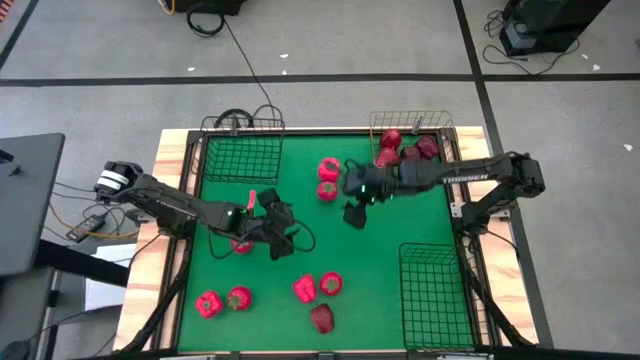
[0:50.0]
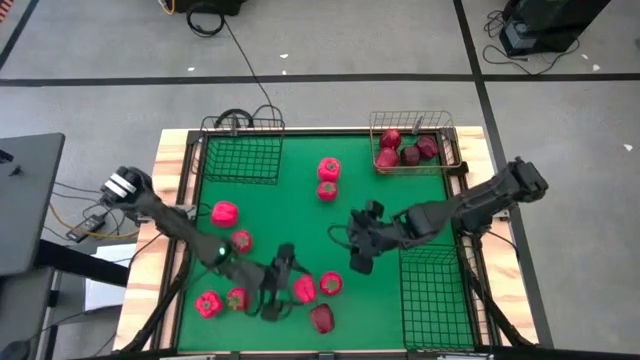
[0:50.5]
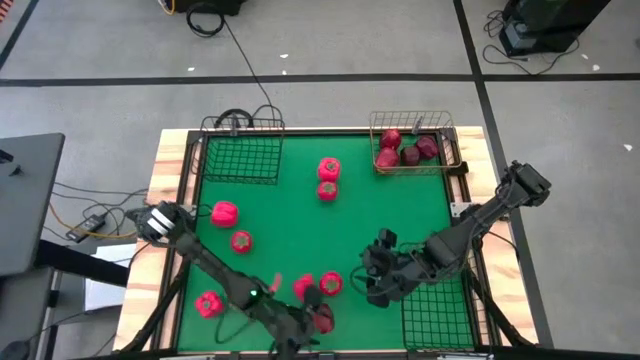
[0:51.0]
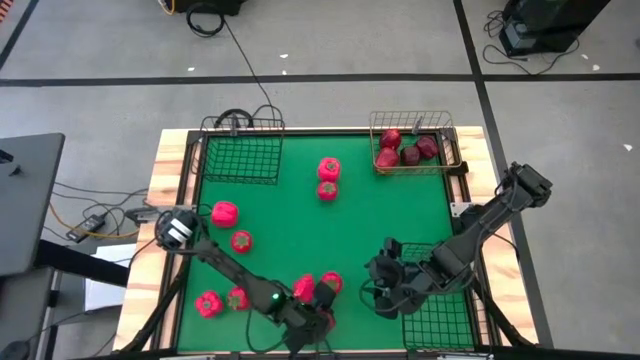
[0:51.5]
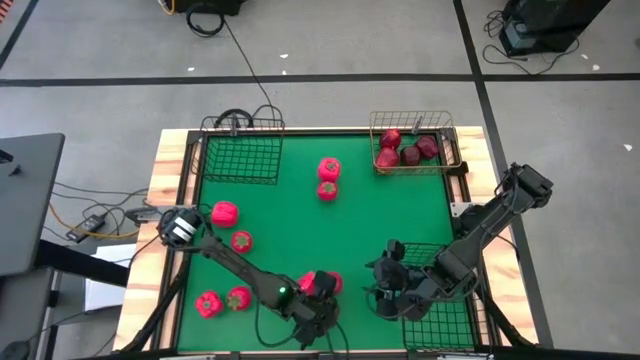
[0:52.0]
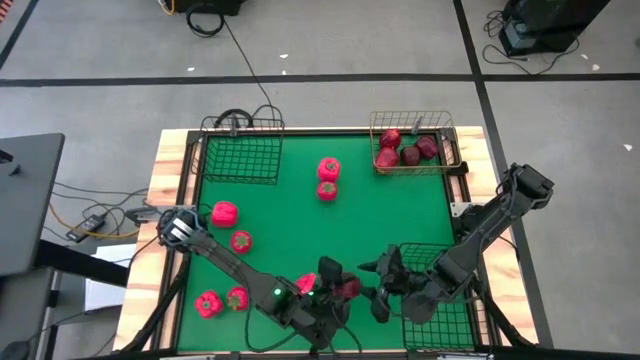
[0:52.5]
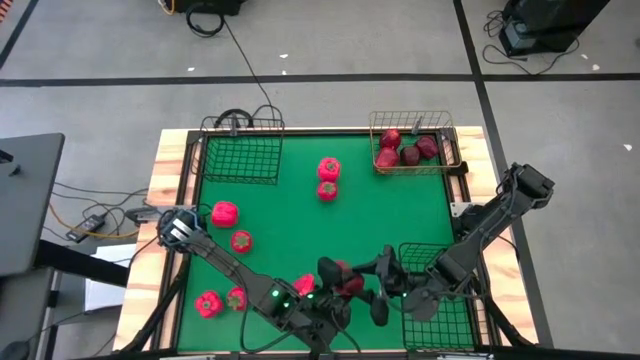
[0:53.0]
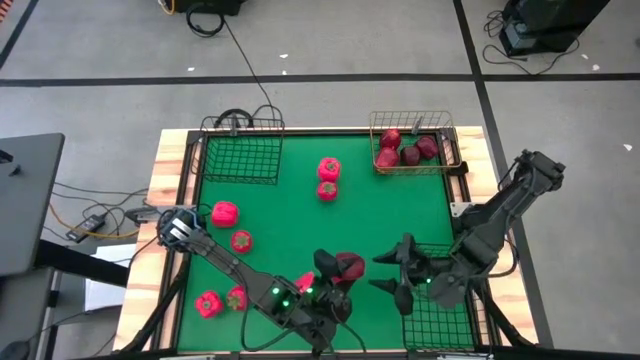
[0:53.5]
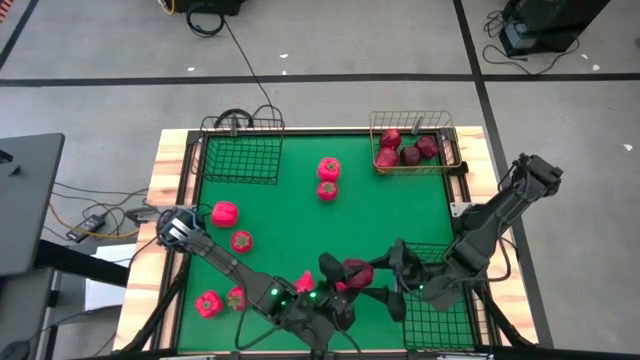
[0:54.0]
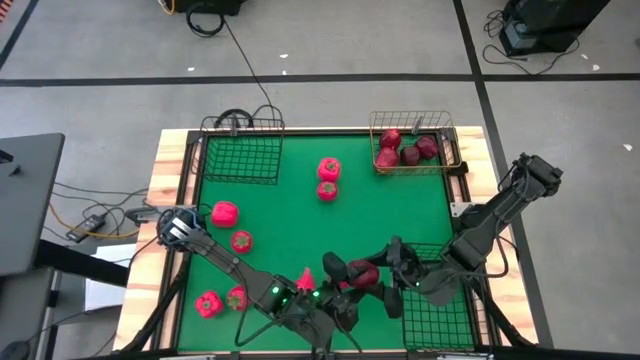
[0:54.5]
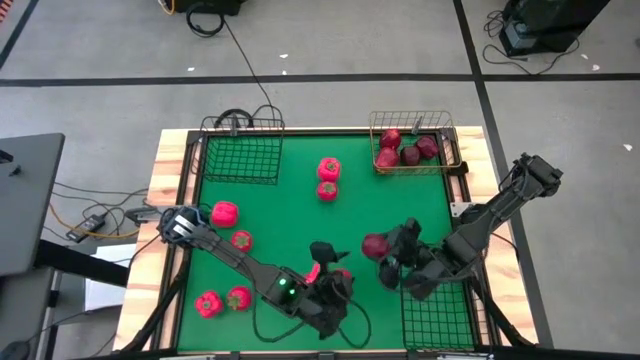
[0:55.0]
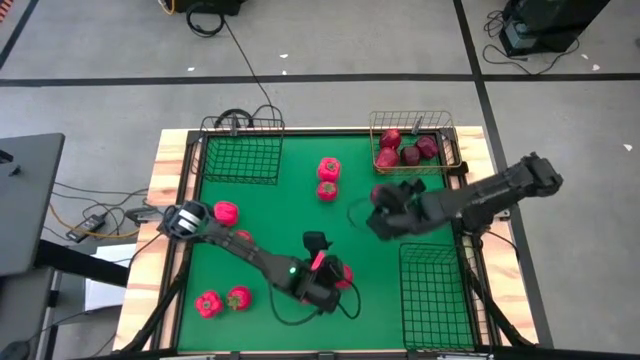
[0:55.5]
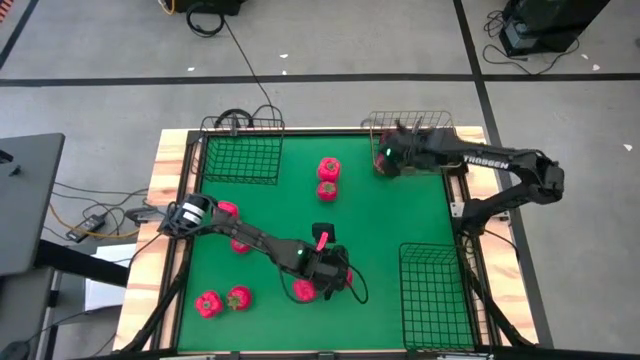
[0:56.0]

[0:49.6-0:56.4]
Task: Sort produce into baskets
Put the red apple into the gold wire basket

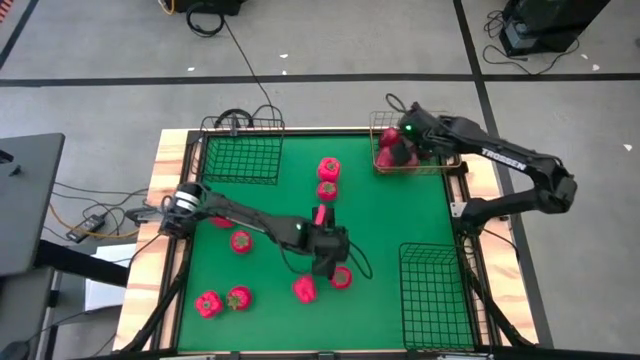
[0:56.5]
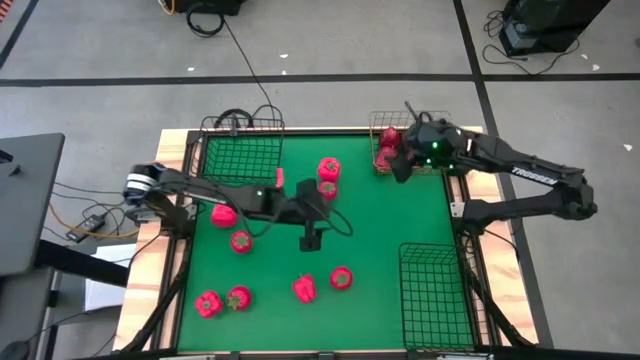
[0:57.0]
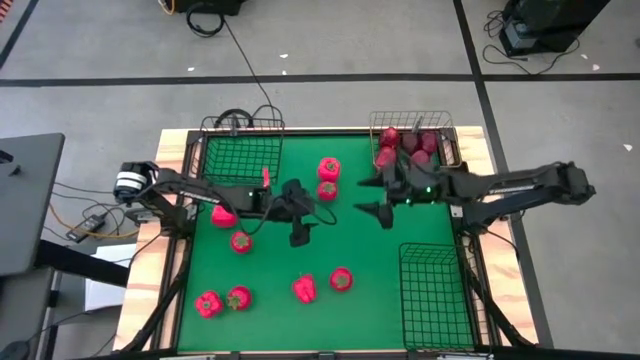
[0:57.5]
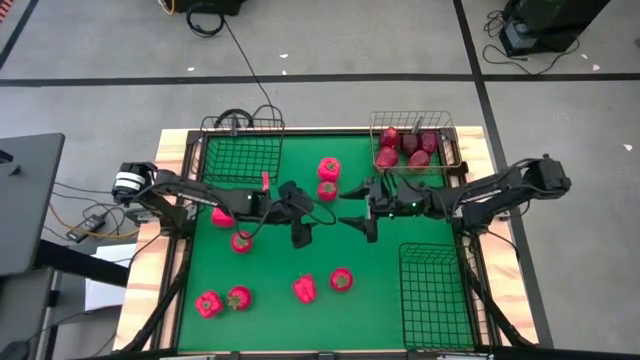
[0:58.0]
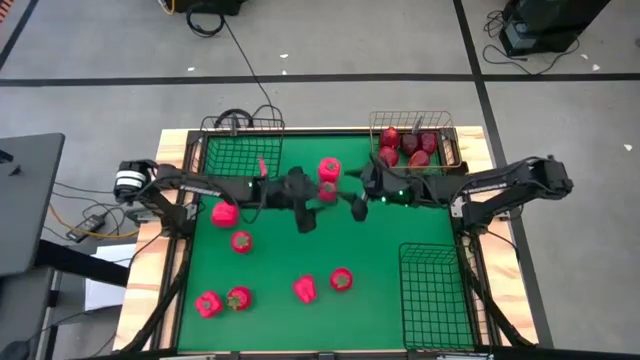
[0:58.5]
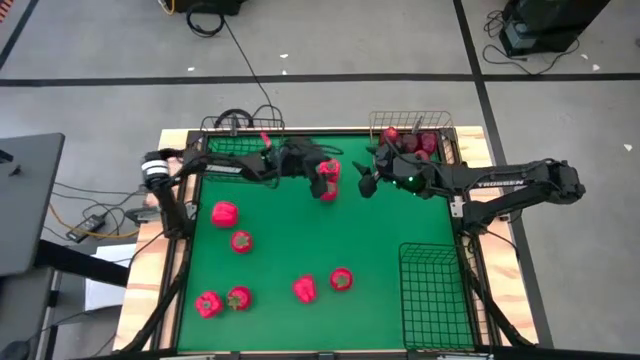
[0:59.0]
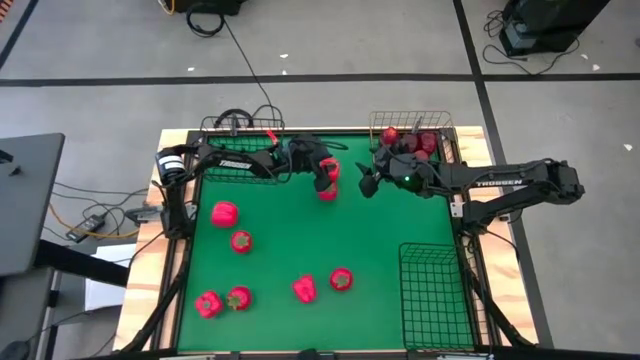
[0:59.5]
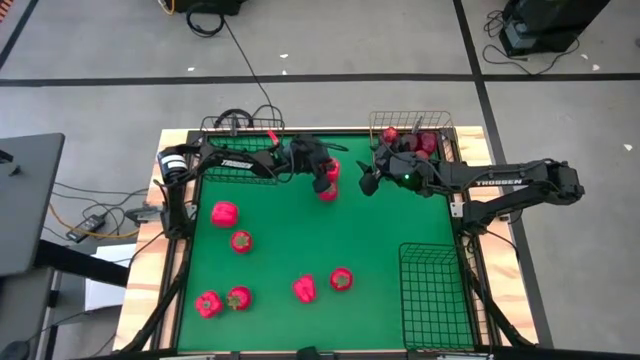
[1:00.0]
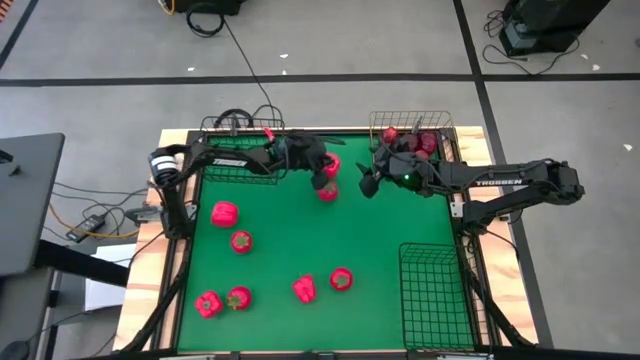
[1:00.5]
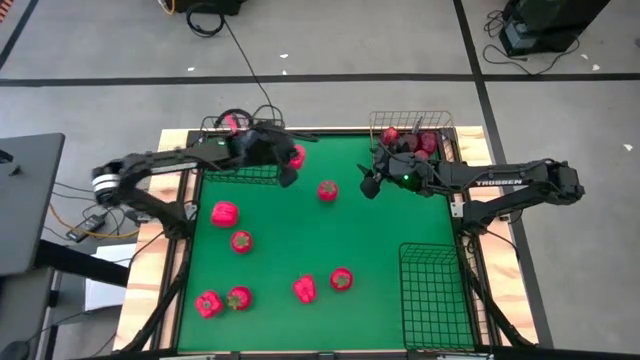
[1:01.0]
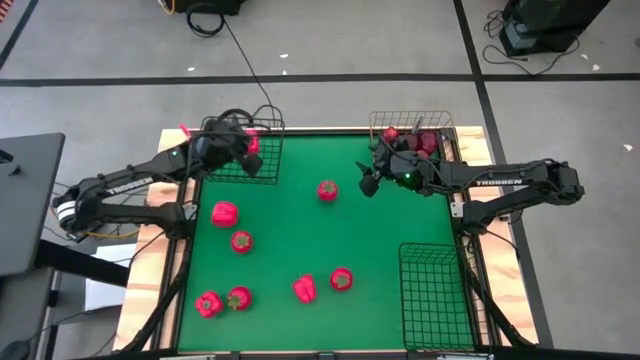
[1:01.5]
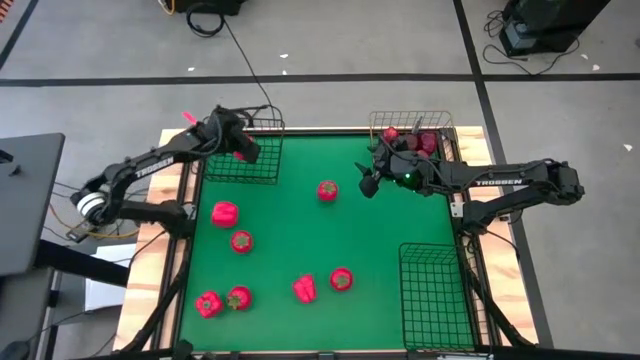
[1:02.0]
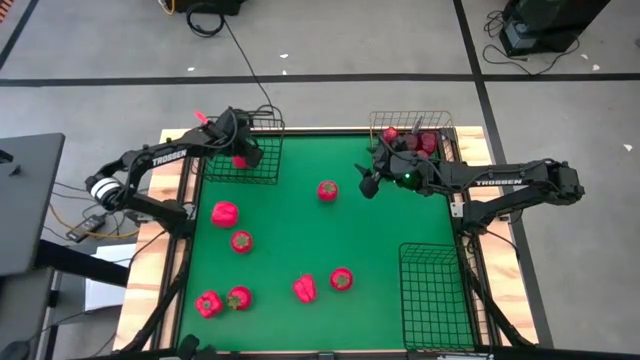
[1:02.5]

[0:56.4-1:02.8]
Put the red bell pepper into the top black wire basket

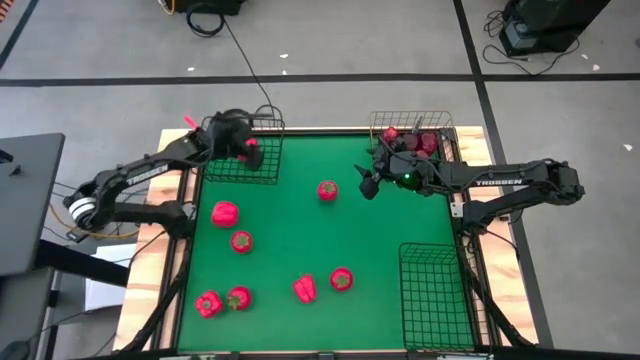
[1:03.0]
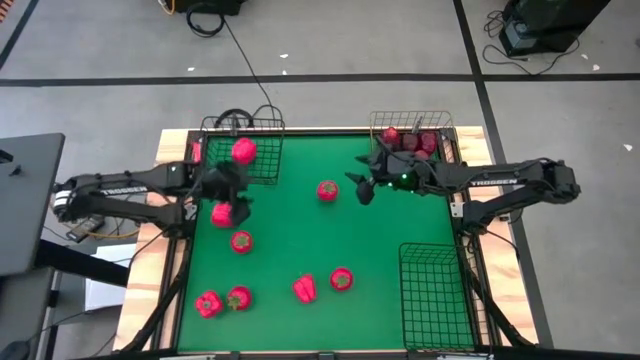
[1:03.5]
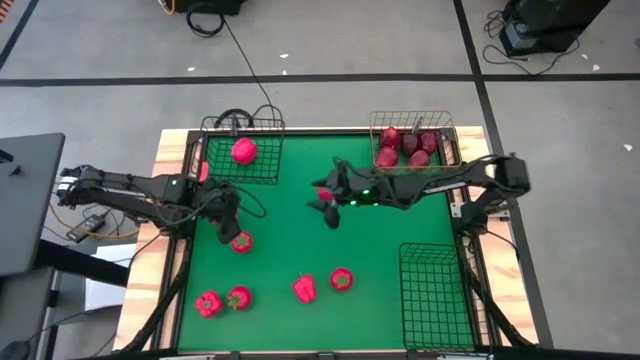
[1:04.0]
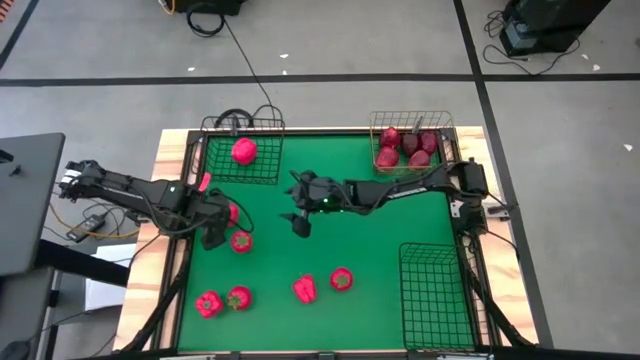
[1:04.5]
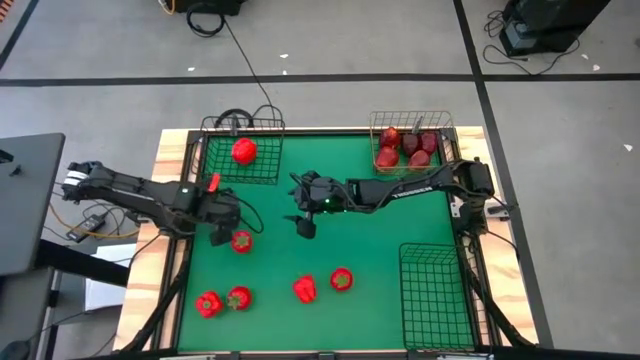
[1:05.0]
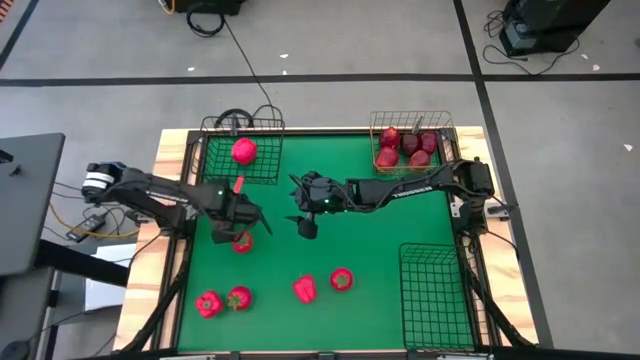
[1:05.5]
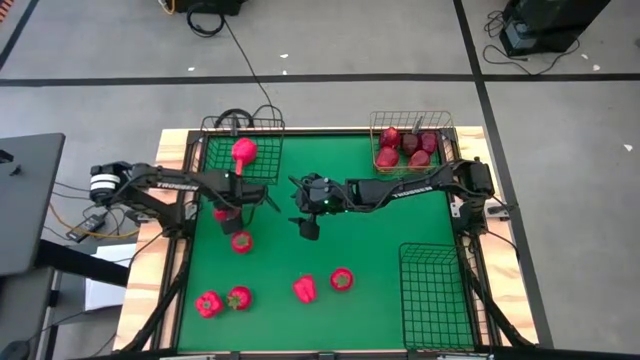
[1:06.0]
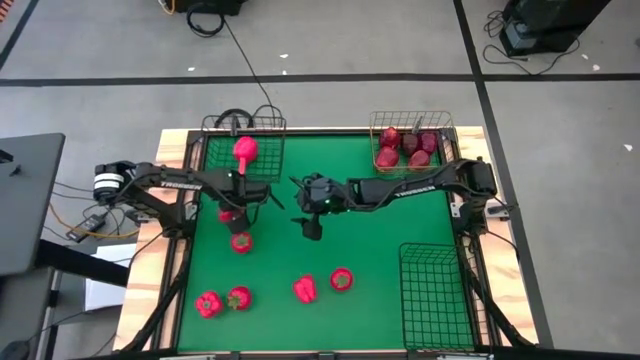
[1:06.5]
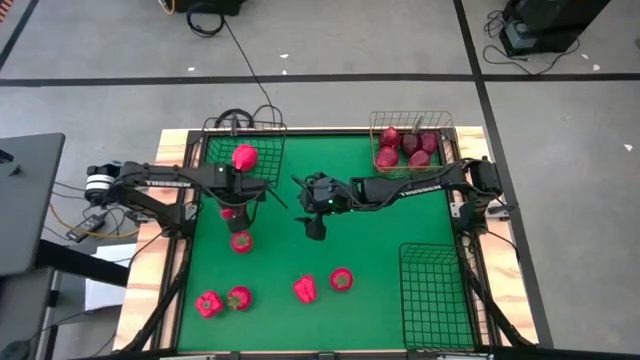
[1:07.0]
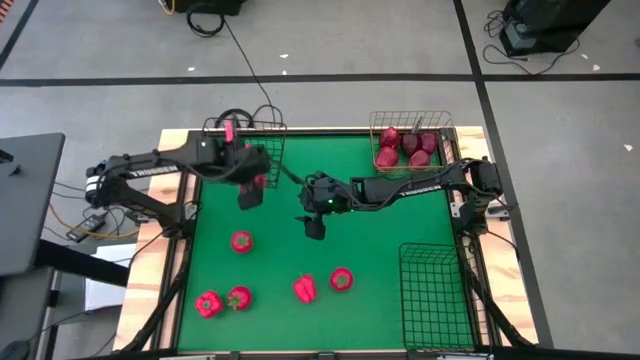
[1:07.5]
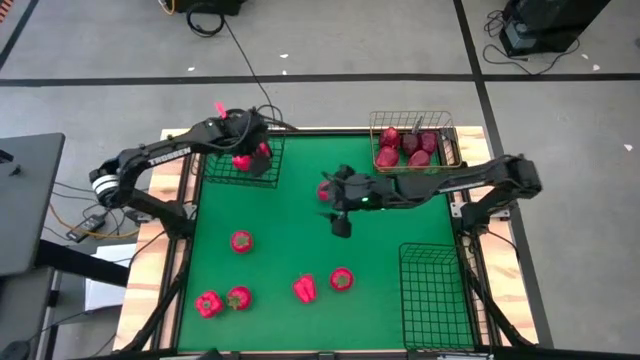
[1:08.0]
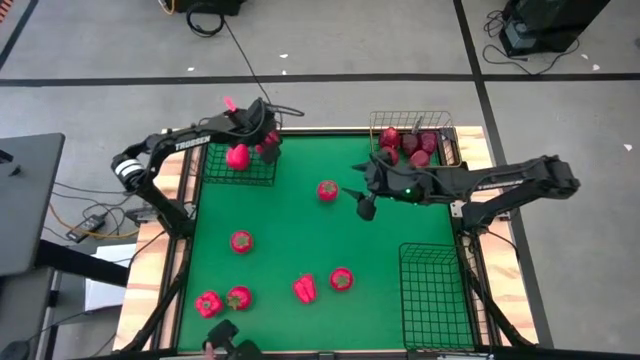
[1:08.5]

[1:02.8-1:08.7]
Put the red bell pepper into the top black wire basket

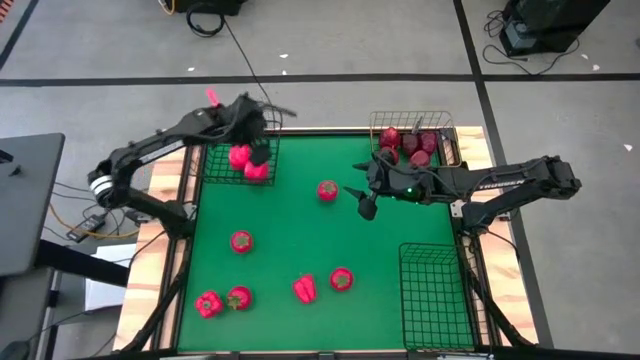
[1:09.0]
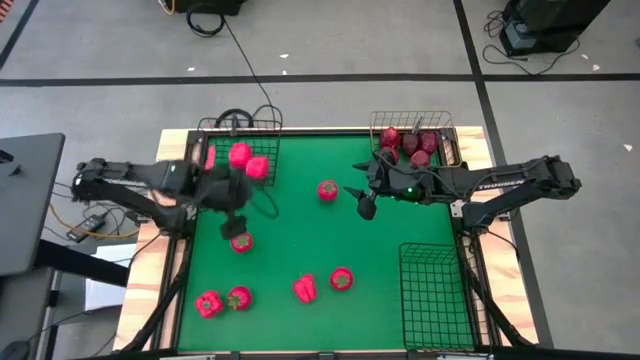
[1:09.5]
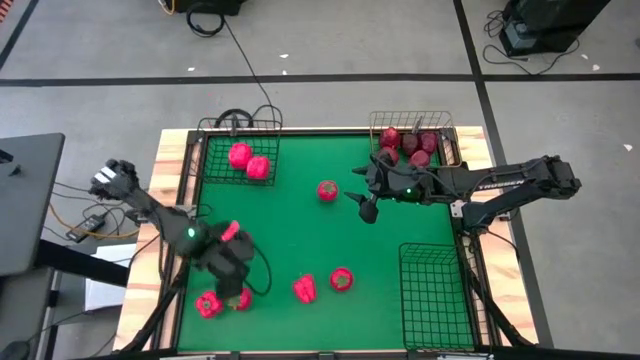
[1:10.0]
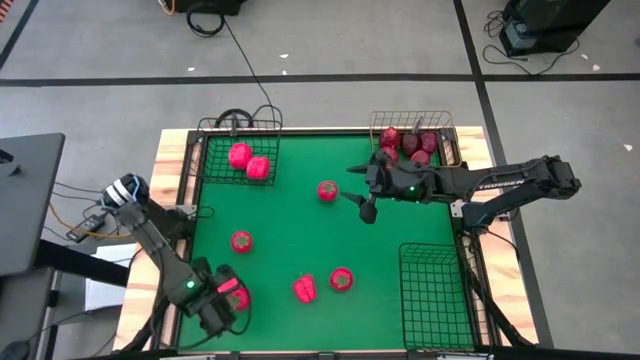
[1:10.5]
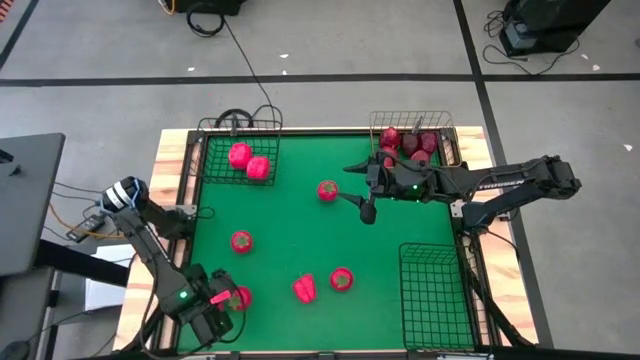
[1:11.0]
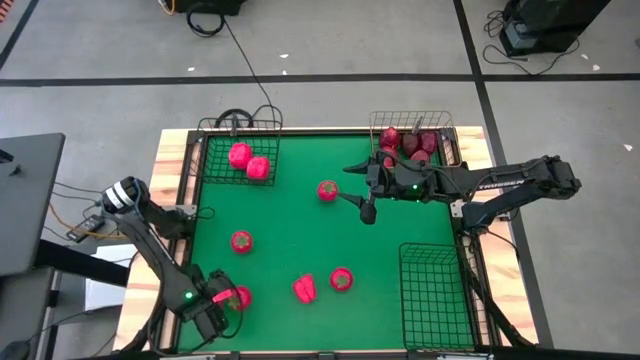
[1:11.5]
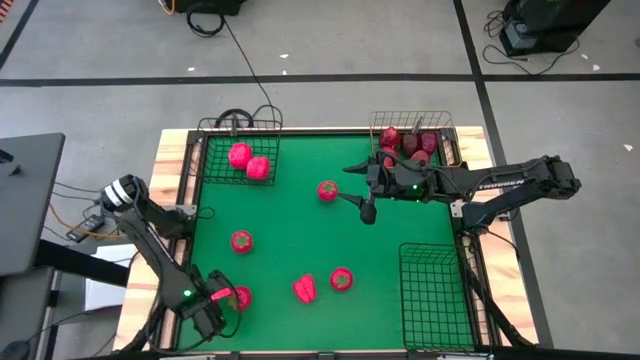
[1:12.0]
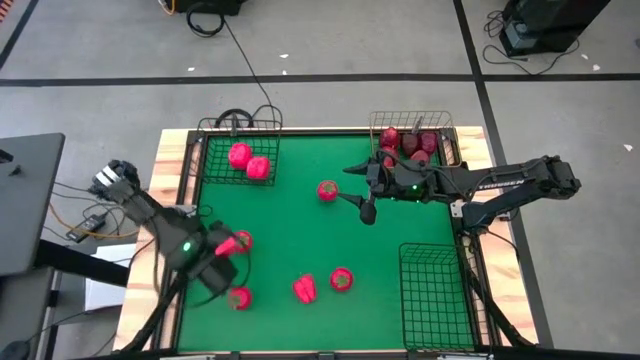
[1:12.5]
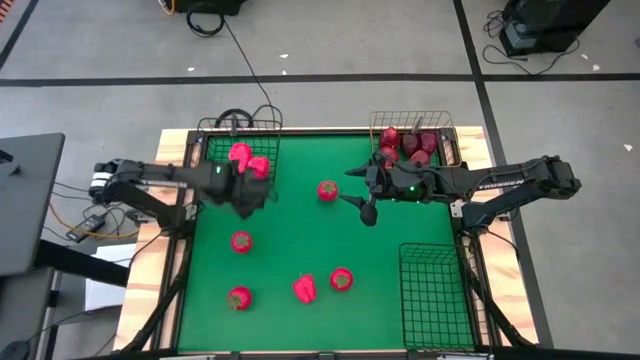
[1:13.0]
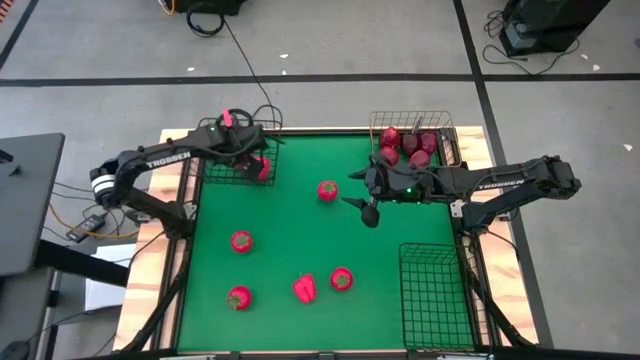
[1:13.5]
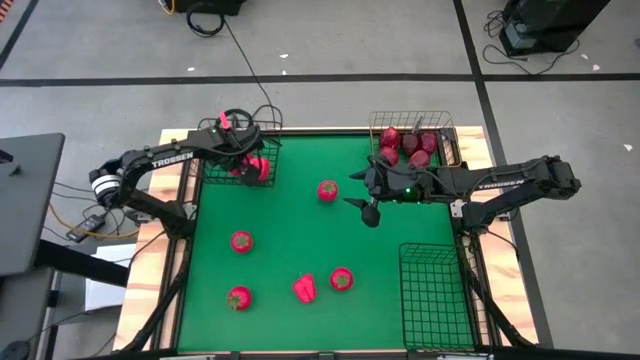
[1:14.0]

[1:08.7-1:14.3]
Put the red bell pepper into the top black wire basket
